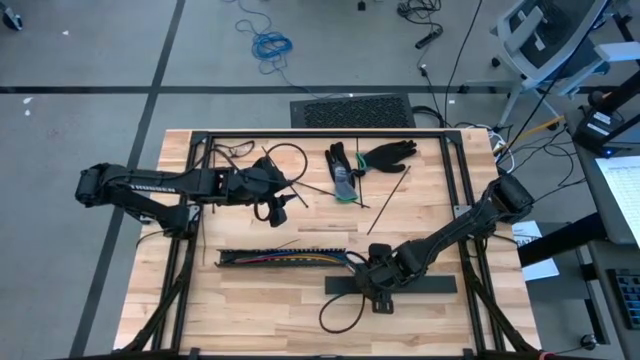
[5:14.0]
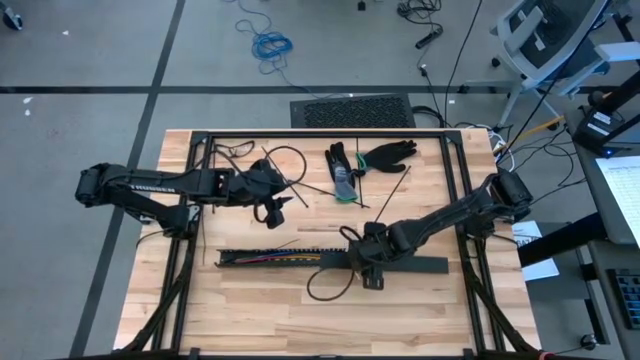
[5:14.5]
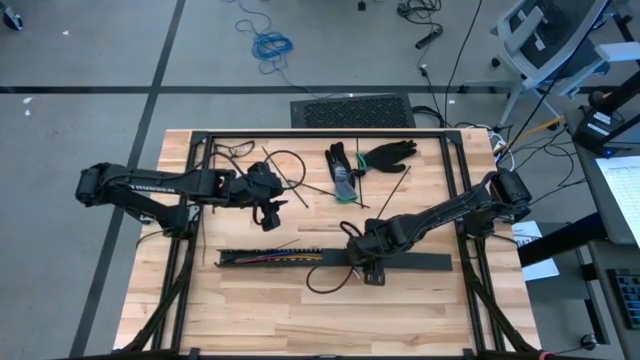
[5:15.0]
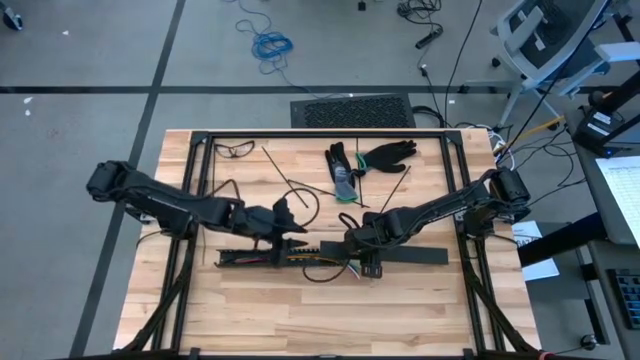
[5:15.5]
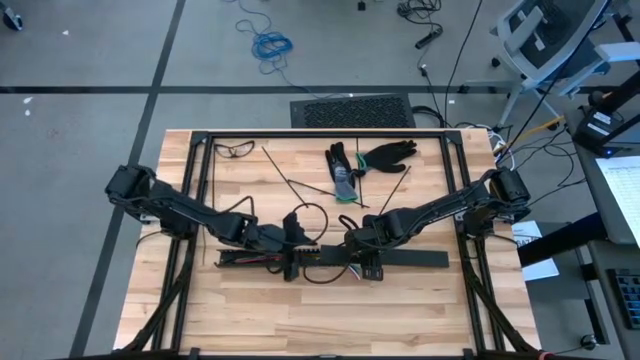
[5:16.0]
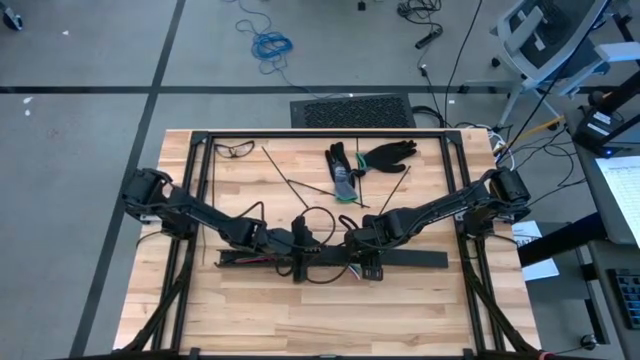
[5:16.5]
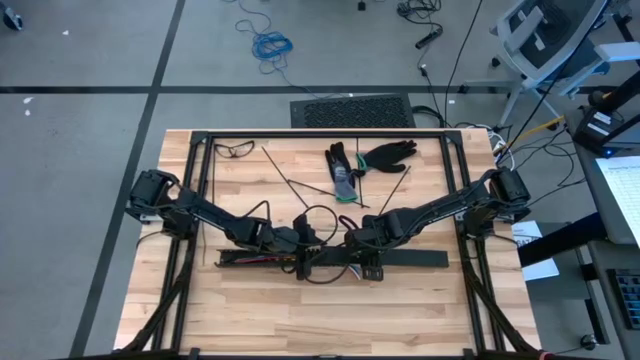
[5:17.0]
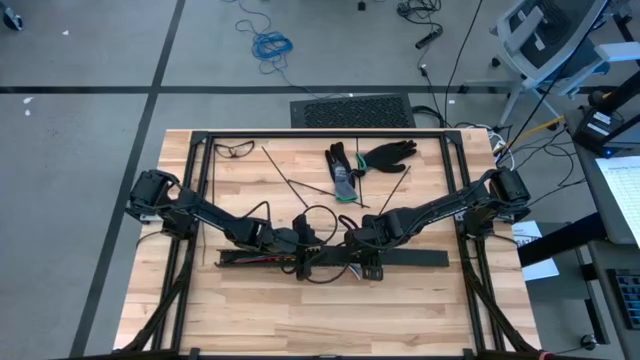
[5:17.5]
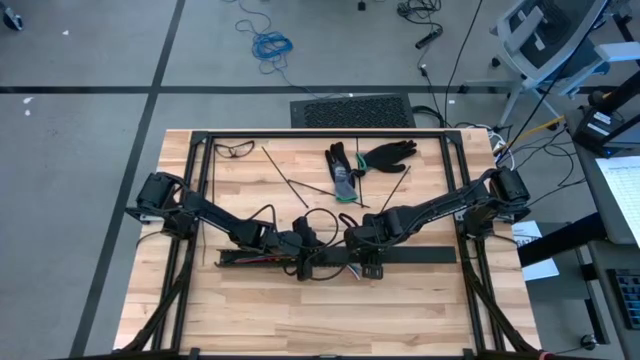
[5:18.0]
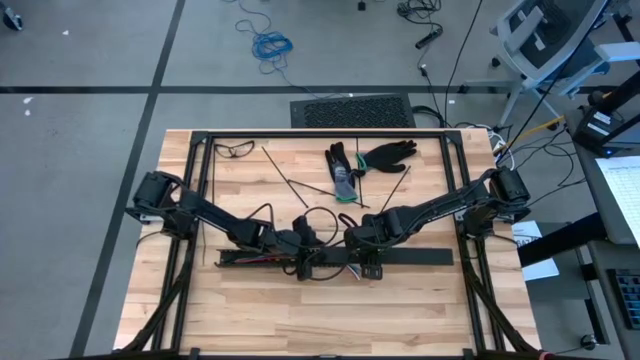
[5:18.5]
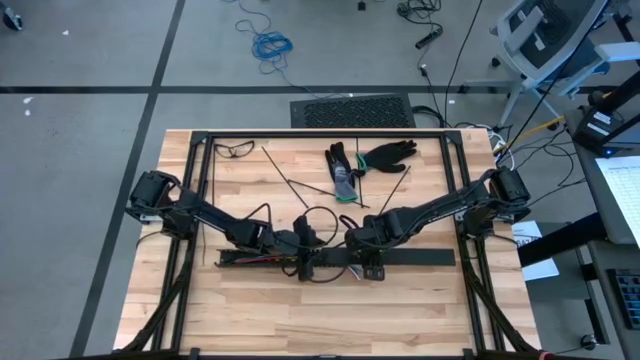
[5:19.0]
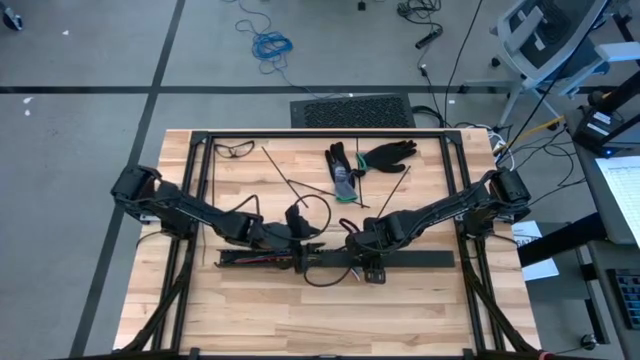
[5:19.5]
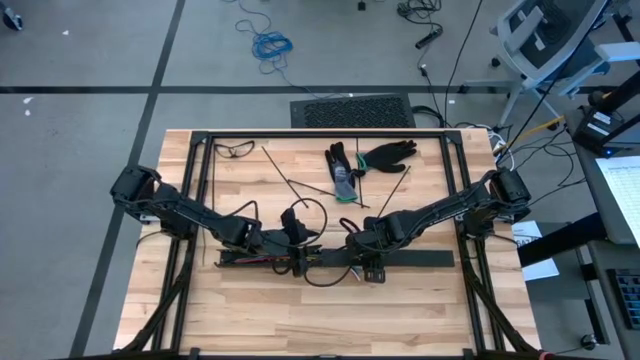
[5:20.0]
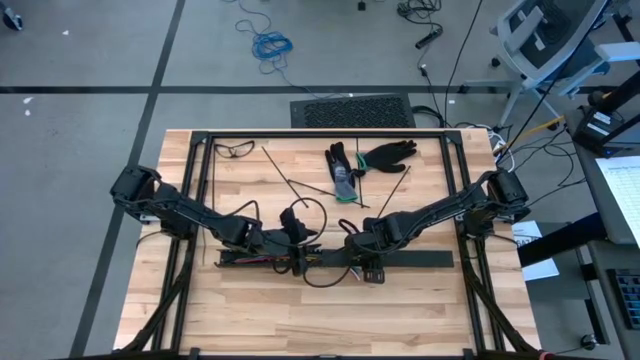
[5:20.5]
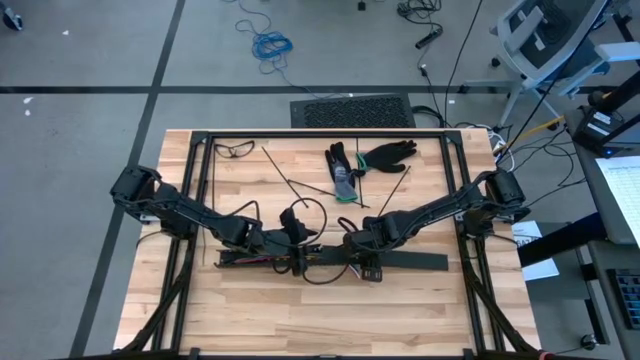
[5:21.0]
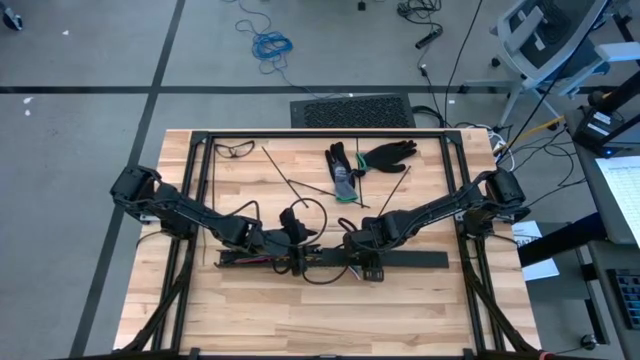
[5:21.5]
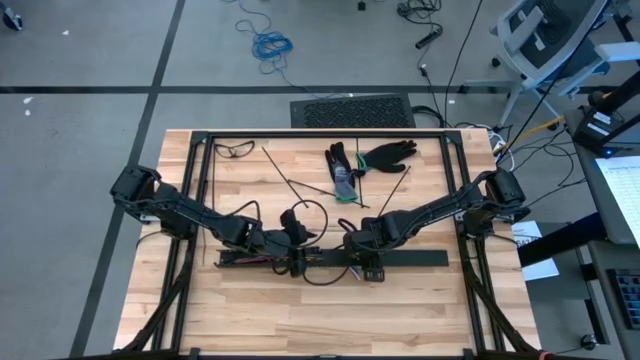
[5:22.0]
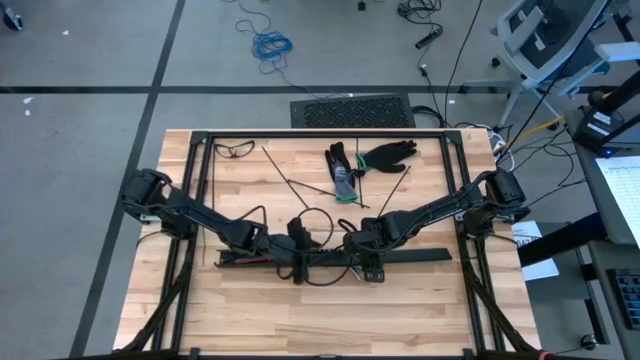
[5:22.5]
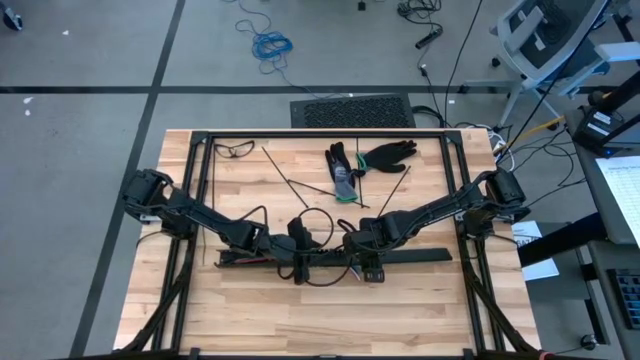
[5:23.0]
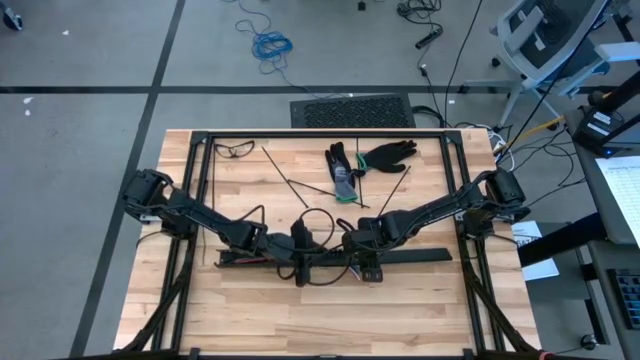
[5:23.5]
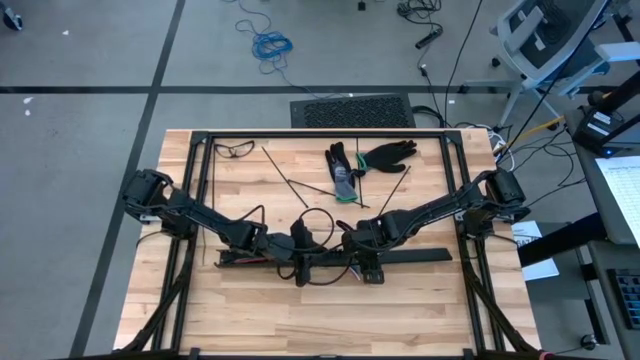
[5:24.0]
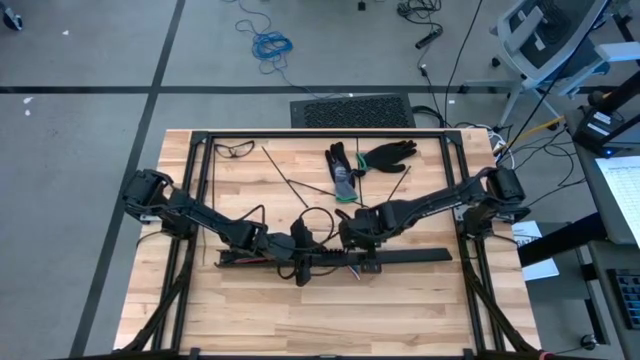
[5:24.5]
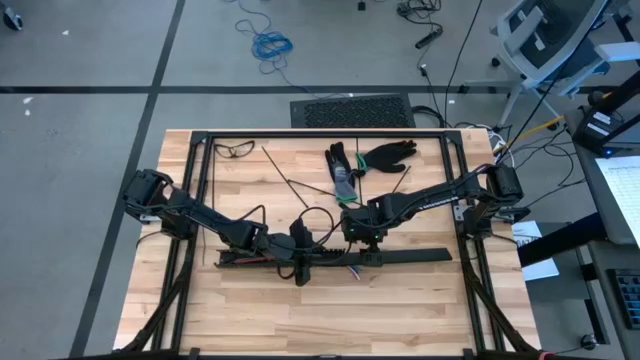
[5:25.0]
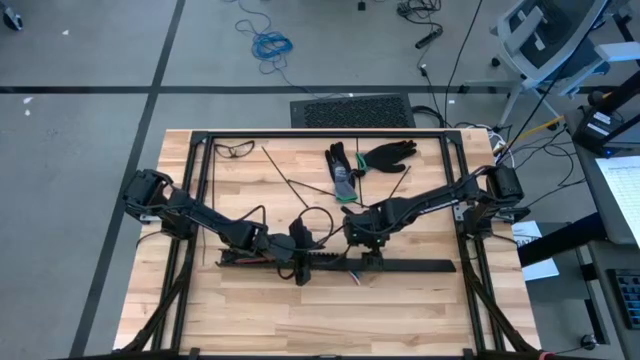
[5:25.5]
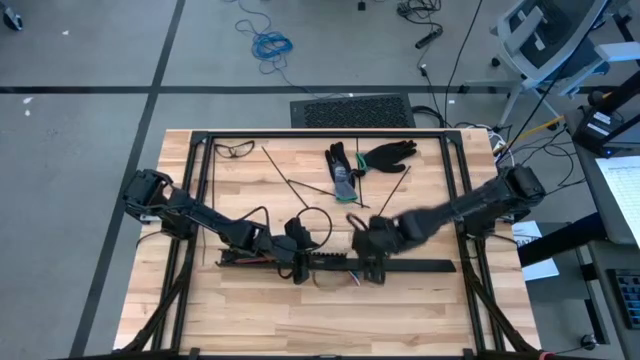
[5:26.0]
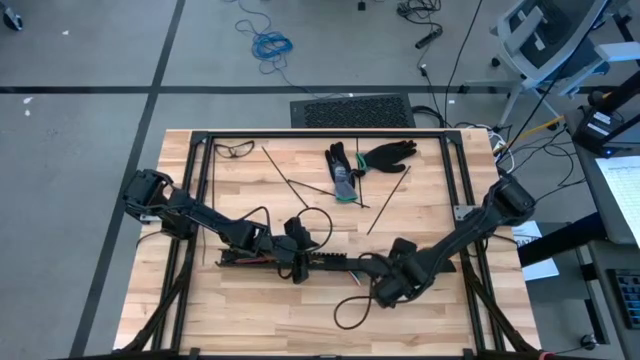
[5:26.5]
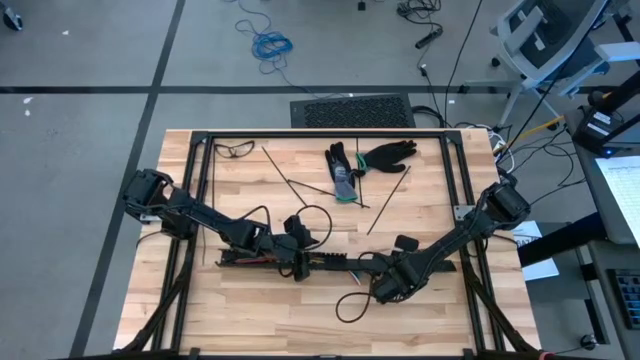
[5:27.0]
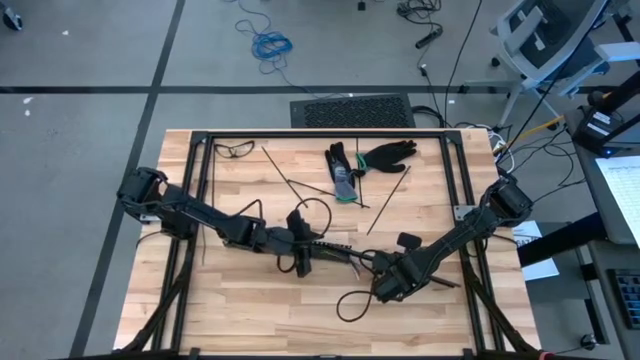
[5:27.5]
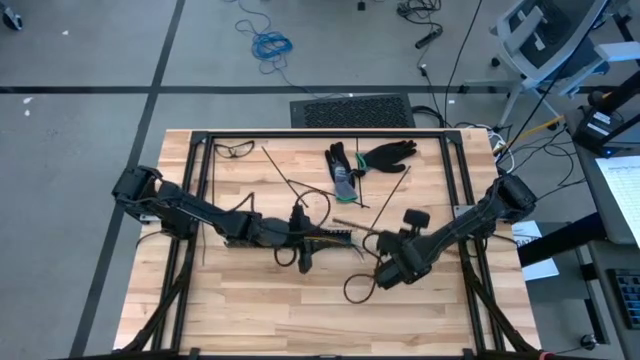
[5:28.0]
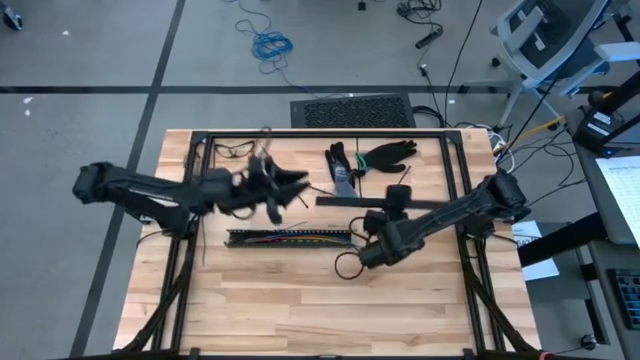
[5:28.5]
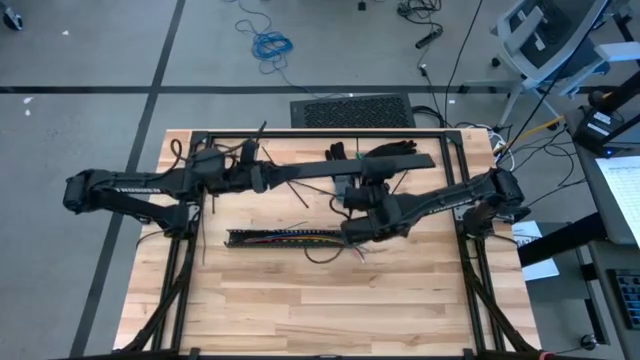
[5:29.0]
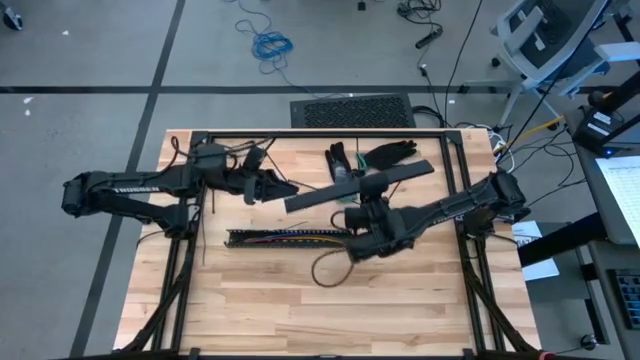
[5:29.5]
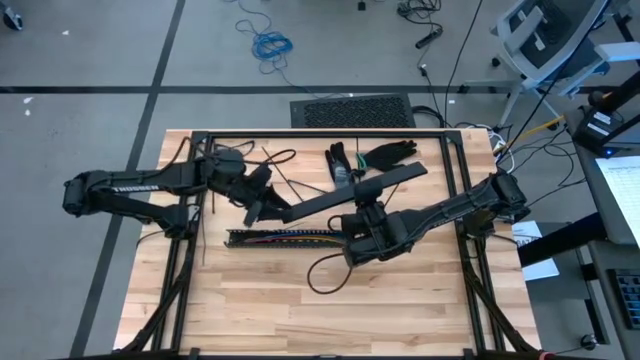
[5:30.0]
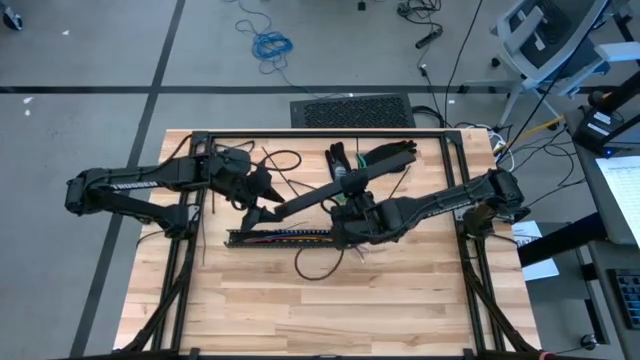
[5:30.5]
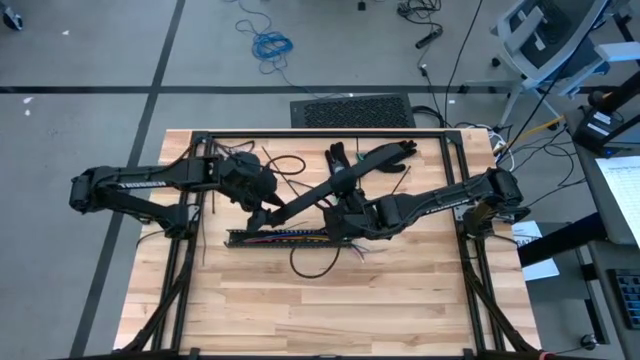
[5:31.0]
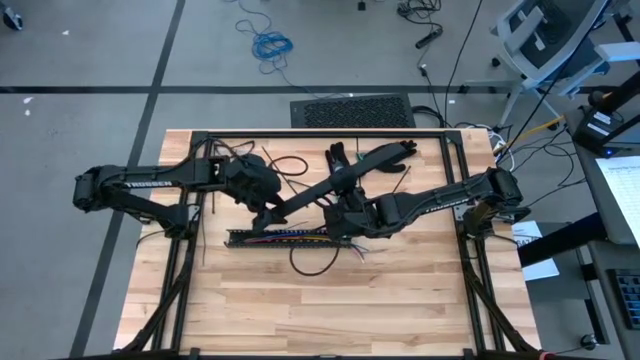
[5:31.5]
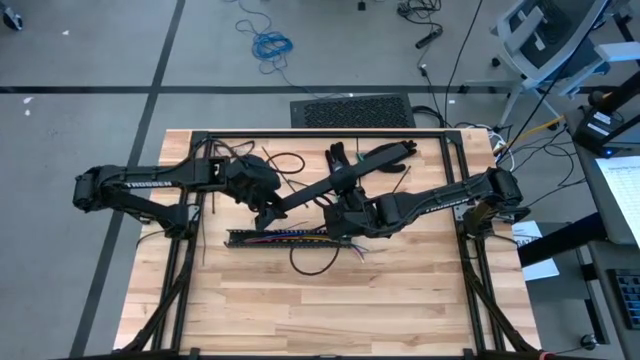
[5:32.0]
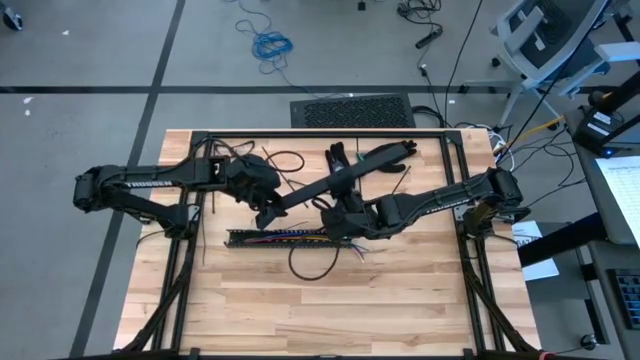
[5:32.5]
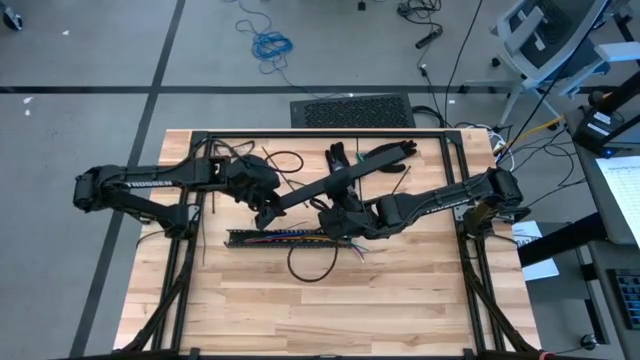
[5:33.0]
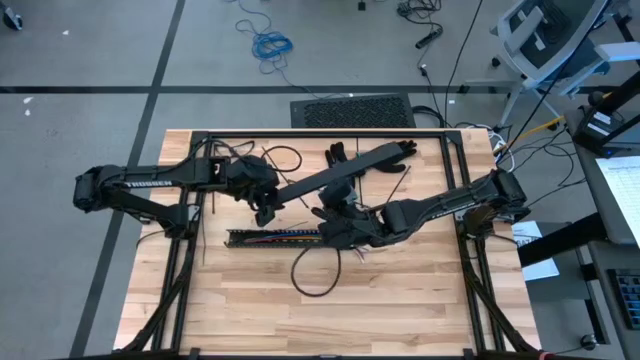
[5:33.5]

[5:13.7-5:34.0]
Task: Ziptie cables
Close the black cable duct
